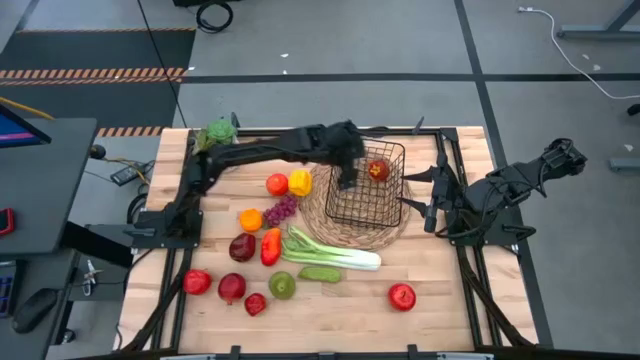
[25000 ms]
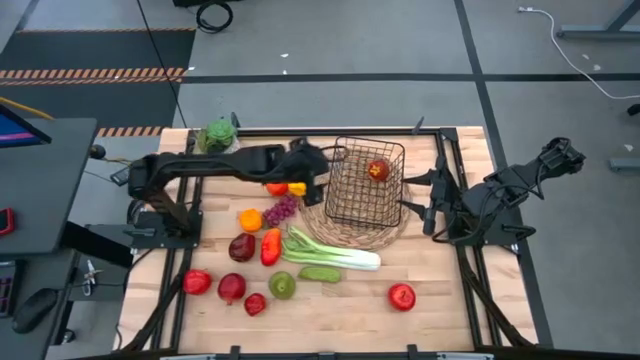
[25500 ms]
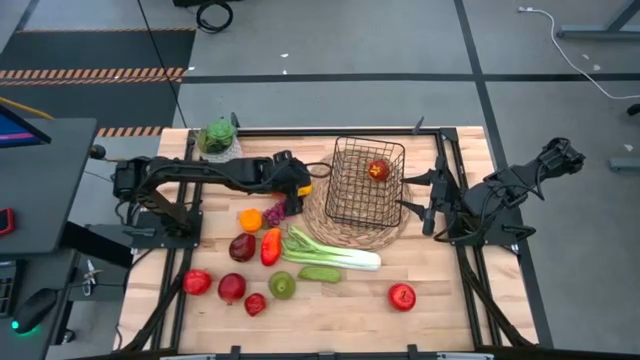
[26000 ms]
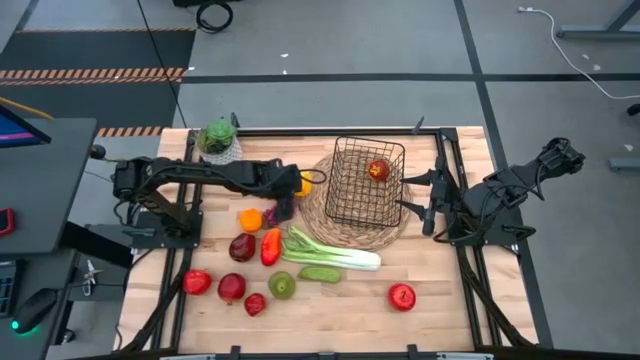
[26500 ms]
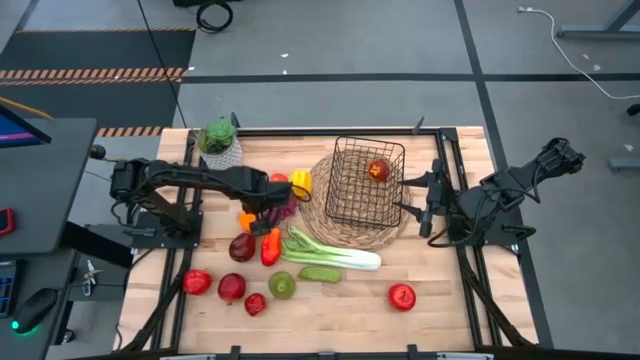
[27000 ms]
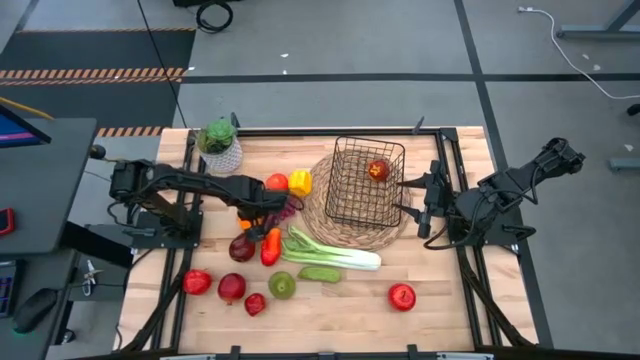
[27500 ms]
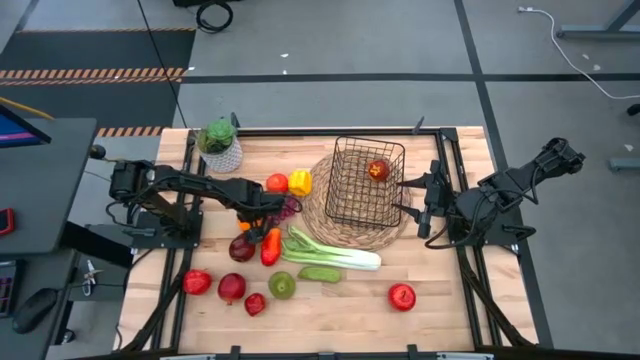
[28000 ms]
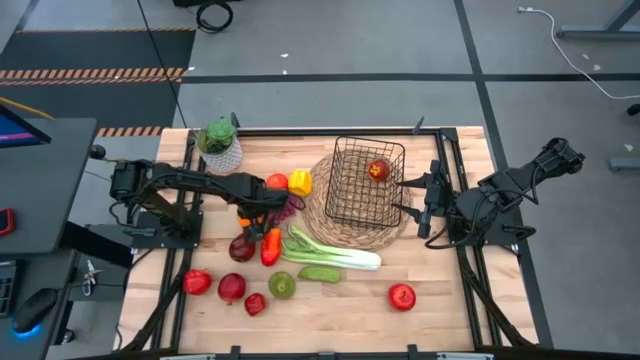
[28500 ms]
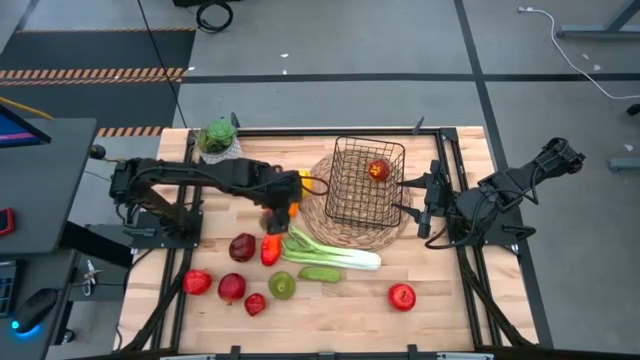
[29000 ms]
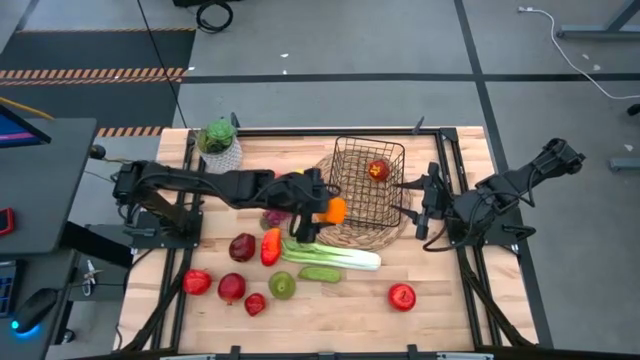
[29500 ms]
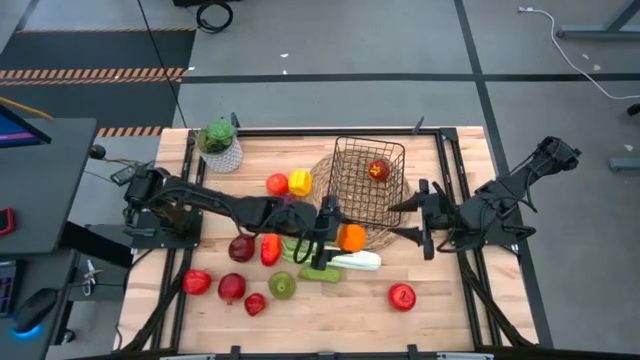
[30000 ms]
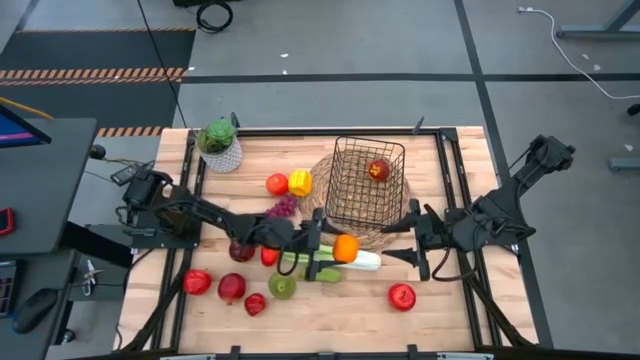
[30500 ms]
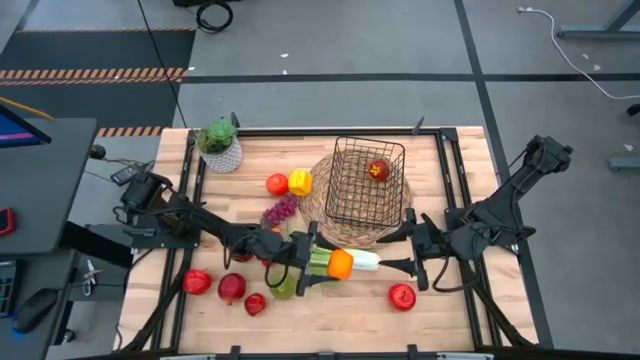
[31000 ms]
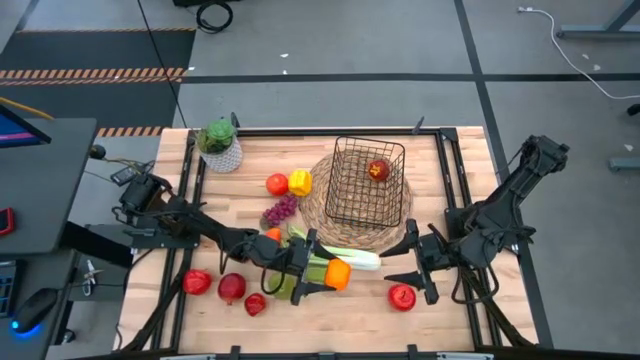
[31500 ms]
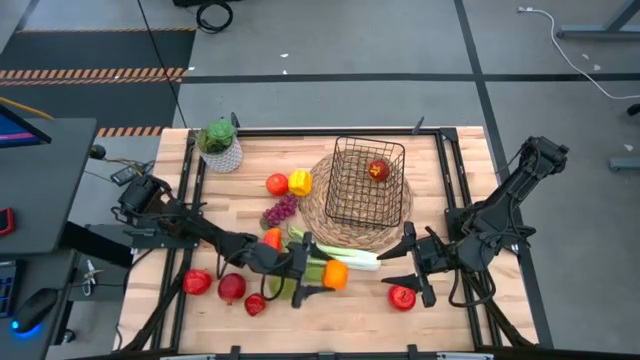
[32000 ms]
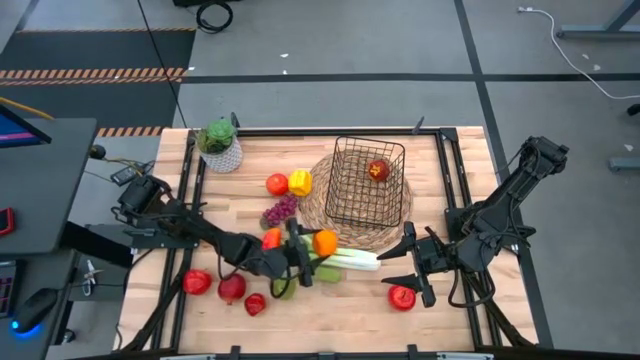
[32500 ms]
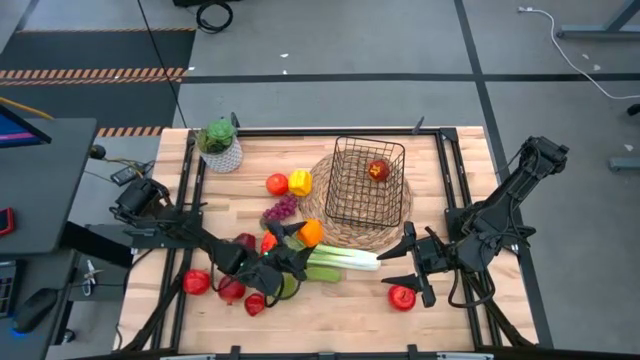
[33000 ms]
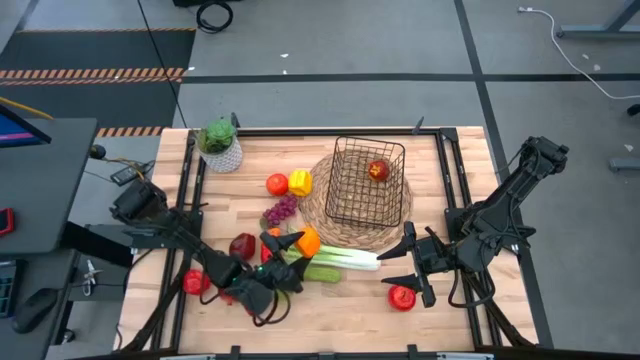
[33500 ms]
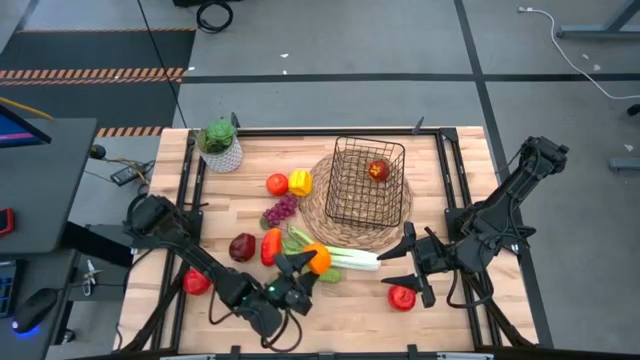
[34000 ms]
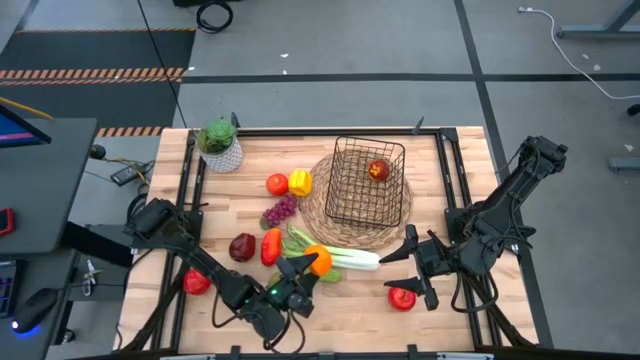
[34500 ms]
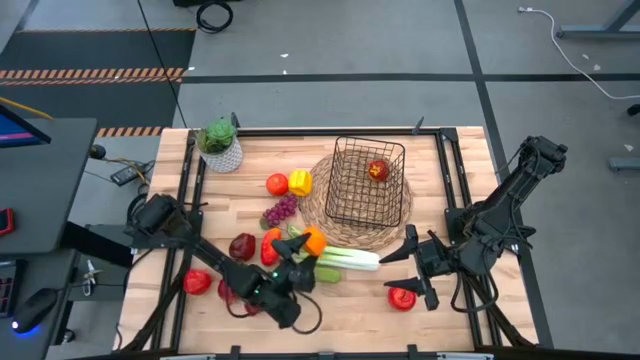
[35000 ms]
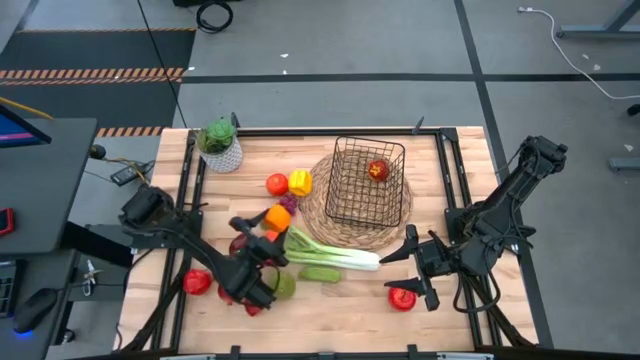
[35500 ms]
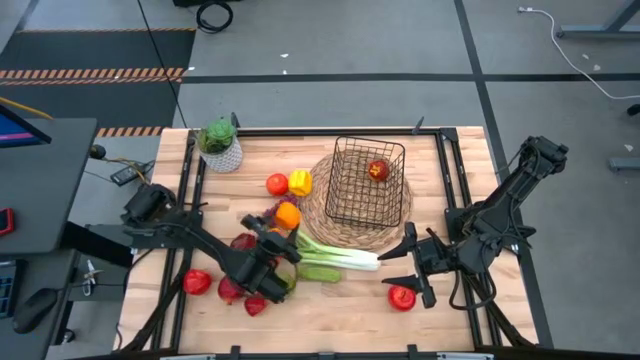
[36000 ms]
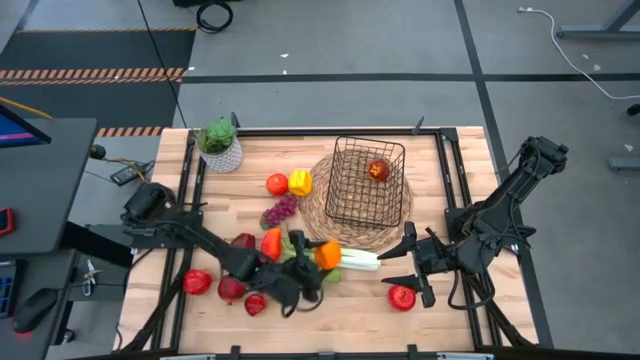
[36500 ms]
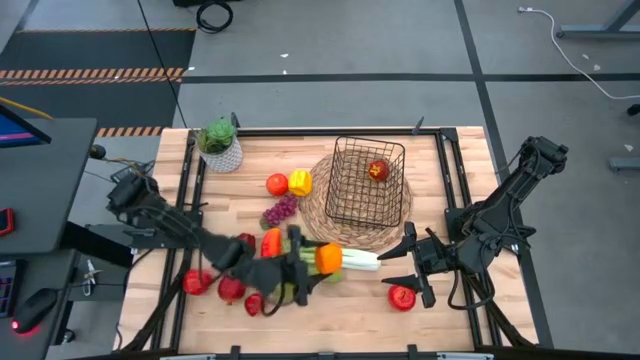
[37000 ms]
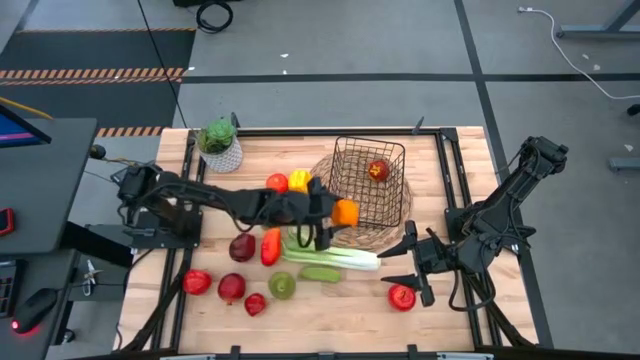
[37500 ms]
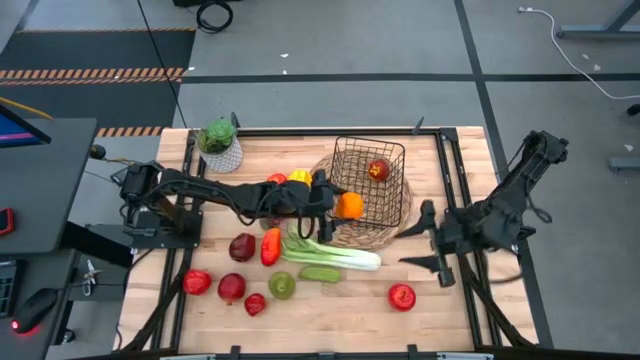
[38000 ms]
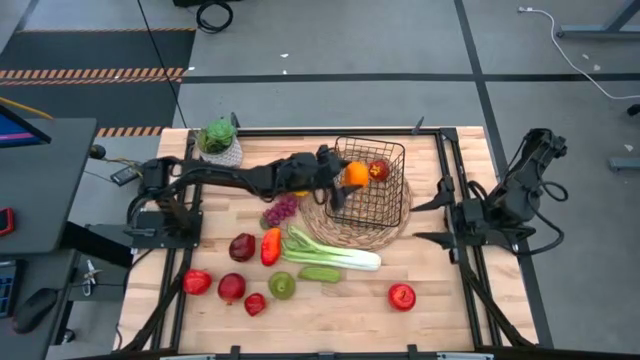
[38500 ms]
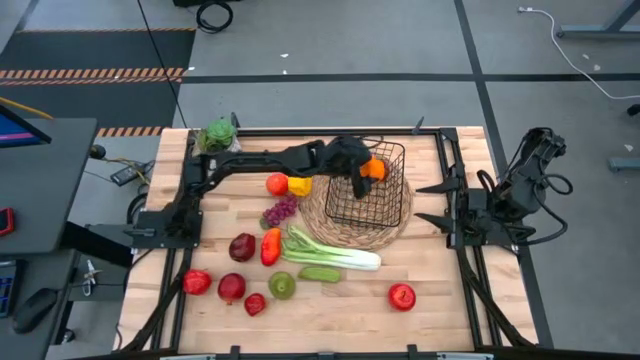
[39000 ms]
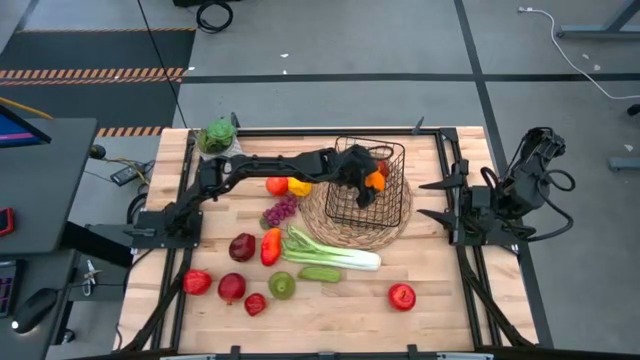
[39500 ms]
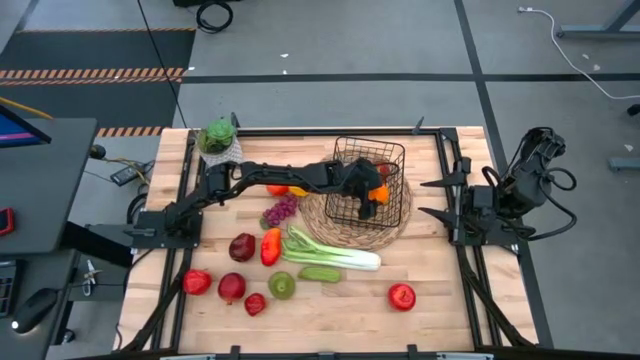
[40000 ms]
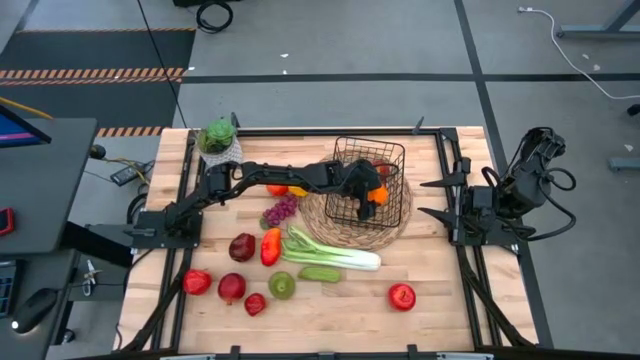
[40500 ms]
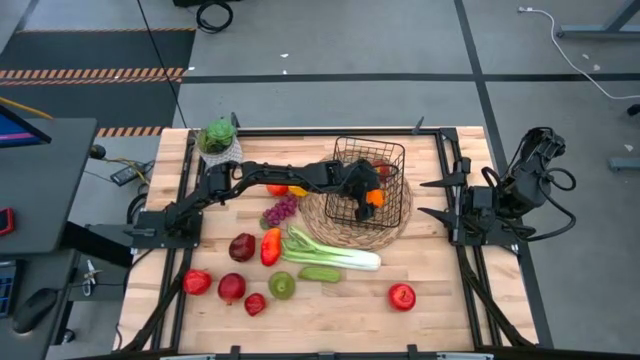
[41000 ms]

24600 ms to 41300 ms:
Task: Build produce basket
Put the orange into the wire basket
